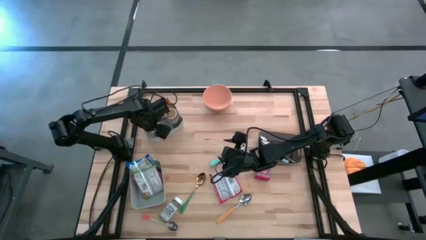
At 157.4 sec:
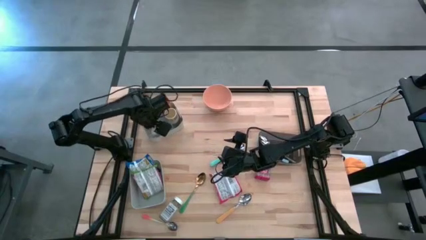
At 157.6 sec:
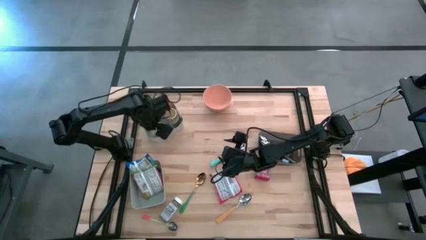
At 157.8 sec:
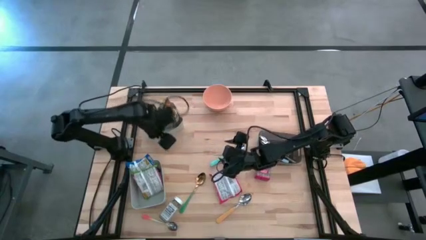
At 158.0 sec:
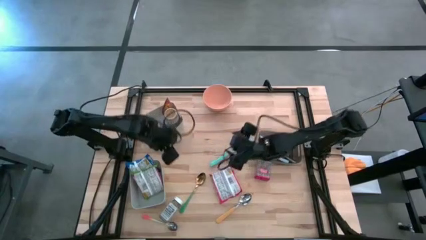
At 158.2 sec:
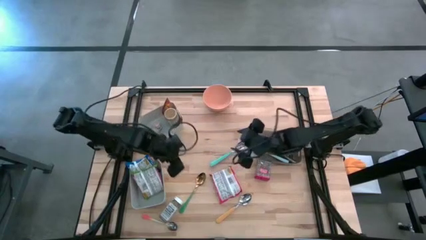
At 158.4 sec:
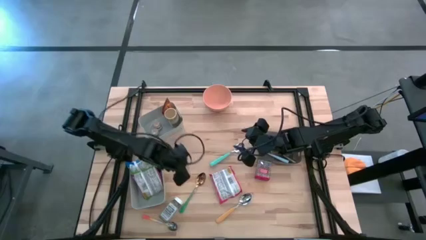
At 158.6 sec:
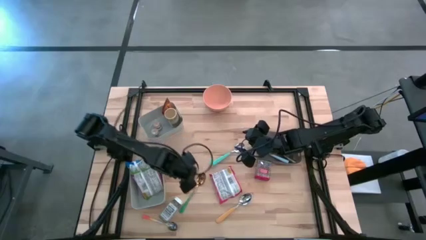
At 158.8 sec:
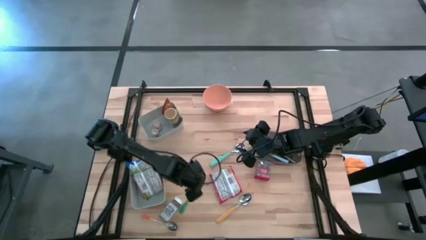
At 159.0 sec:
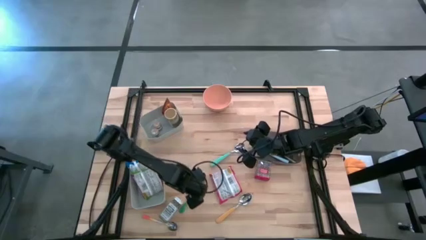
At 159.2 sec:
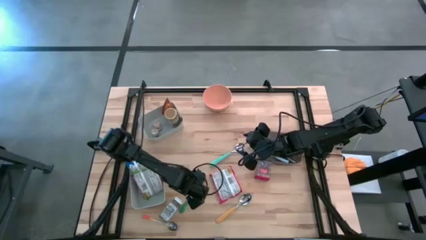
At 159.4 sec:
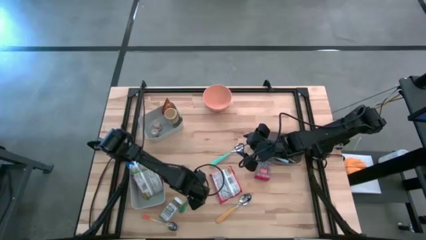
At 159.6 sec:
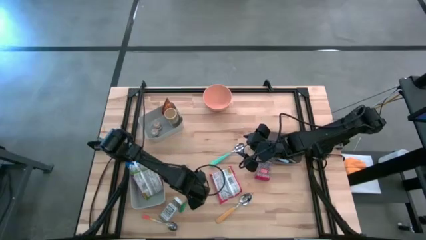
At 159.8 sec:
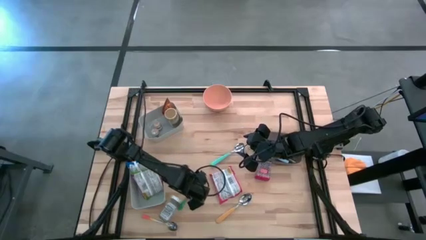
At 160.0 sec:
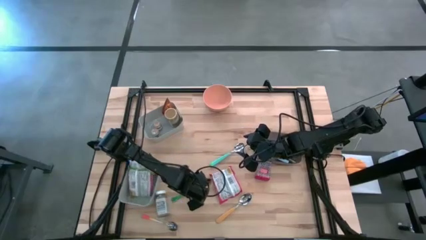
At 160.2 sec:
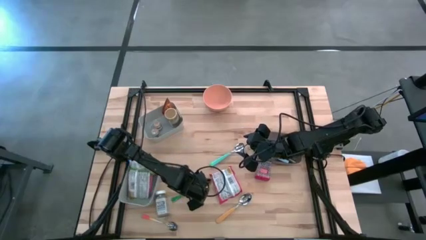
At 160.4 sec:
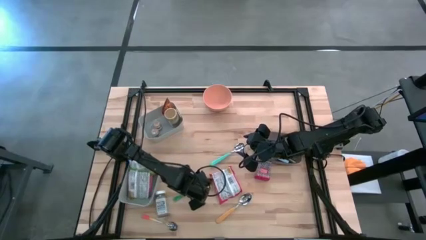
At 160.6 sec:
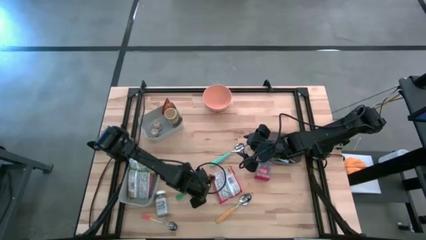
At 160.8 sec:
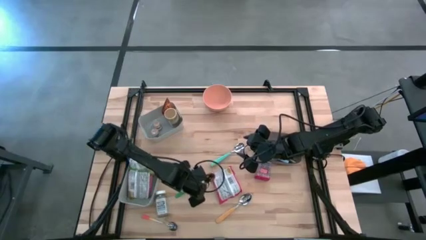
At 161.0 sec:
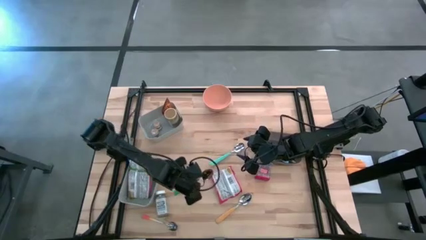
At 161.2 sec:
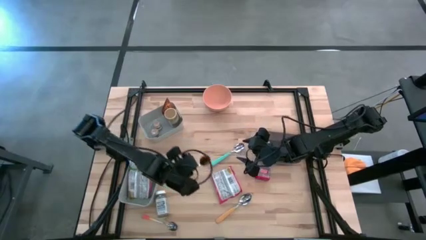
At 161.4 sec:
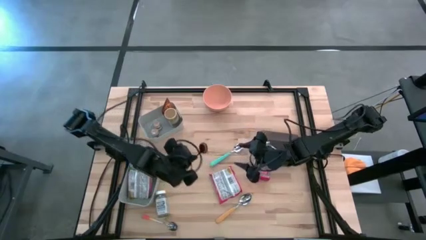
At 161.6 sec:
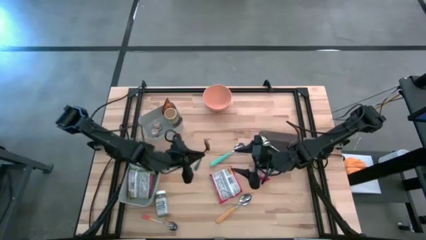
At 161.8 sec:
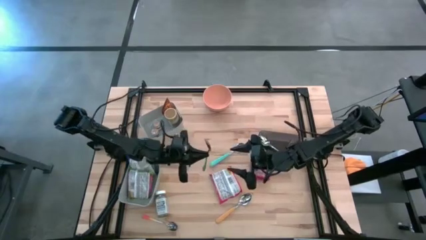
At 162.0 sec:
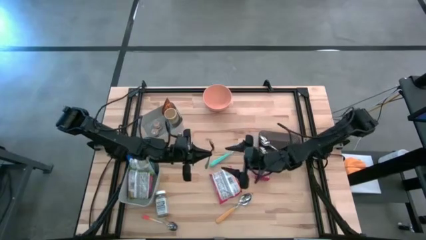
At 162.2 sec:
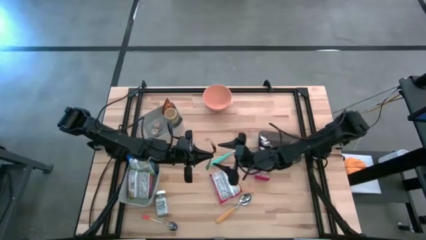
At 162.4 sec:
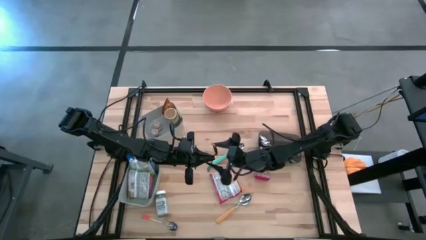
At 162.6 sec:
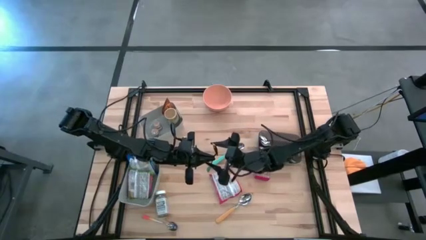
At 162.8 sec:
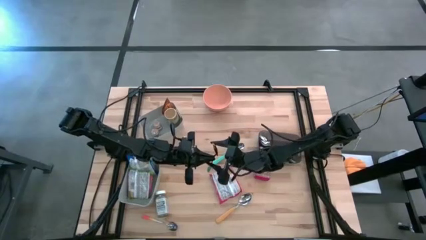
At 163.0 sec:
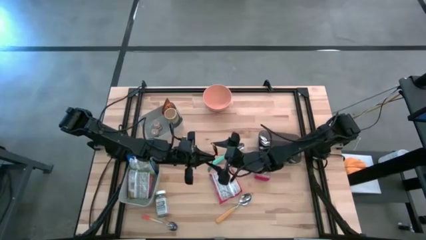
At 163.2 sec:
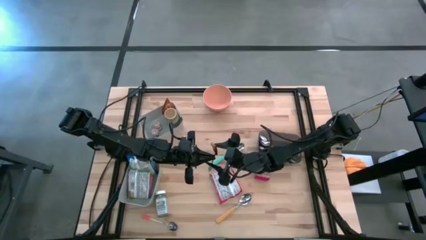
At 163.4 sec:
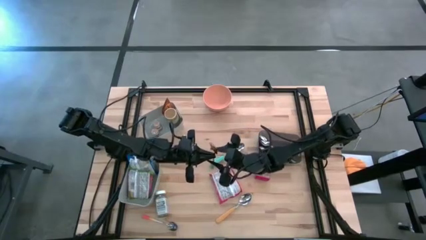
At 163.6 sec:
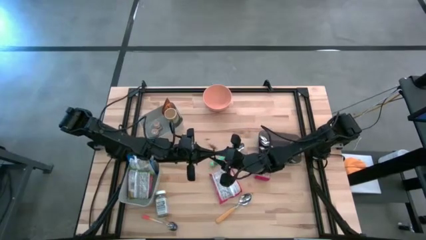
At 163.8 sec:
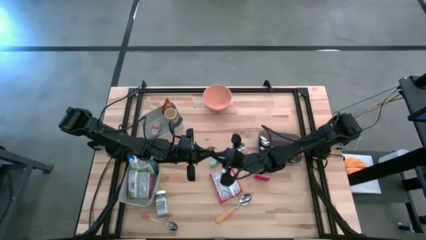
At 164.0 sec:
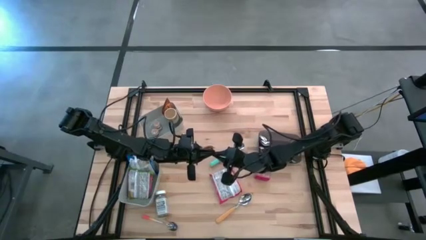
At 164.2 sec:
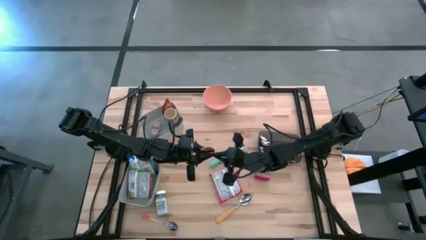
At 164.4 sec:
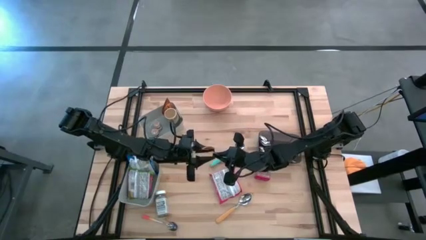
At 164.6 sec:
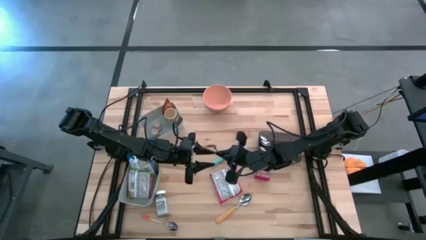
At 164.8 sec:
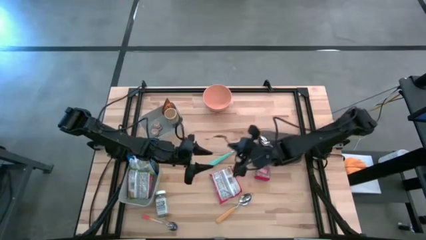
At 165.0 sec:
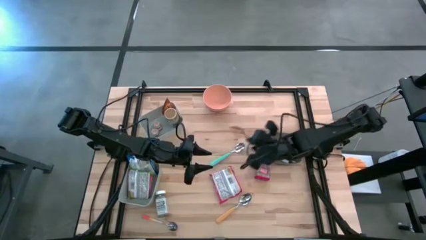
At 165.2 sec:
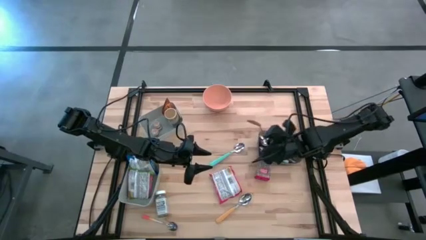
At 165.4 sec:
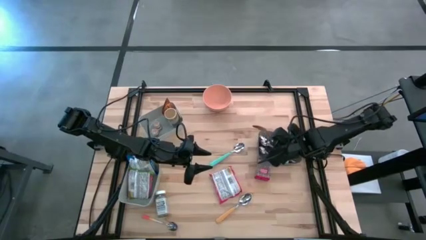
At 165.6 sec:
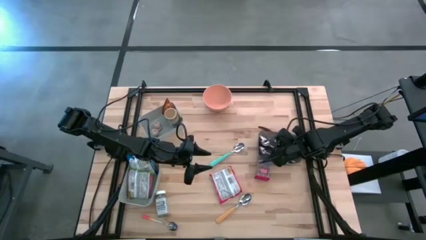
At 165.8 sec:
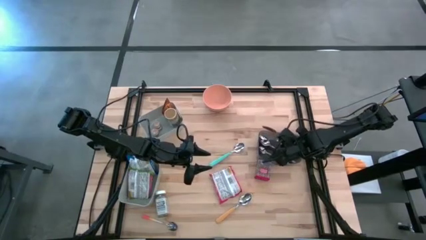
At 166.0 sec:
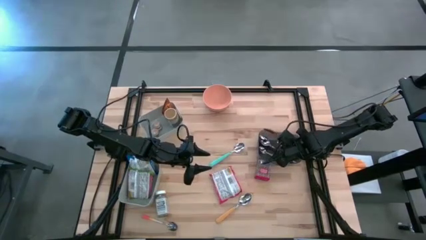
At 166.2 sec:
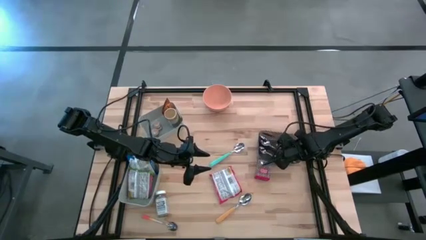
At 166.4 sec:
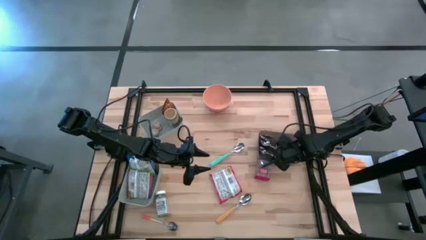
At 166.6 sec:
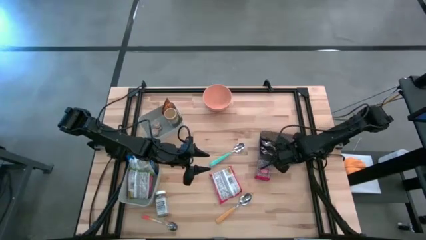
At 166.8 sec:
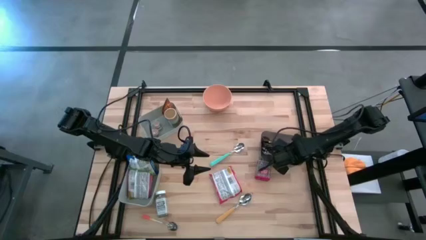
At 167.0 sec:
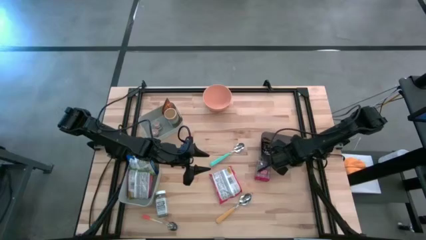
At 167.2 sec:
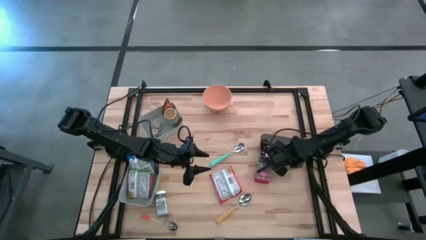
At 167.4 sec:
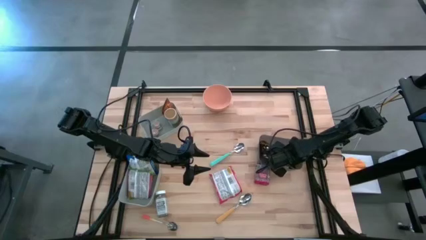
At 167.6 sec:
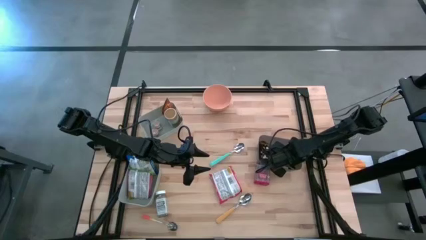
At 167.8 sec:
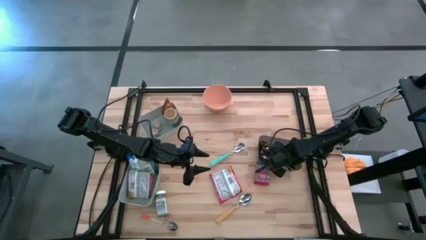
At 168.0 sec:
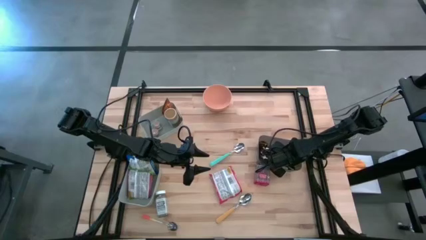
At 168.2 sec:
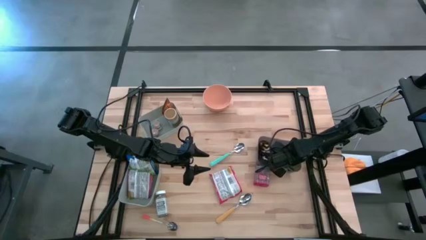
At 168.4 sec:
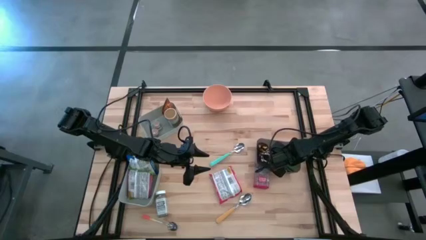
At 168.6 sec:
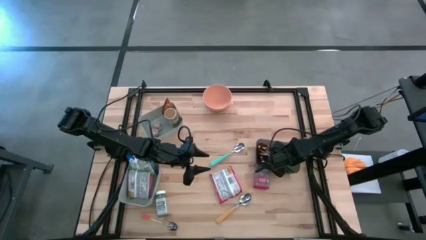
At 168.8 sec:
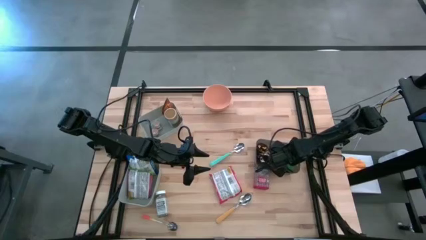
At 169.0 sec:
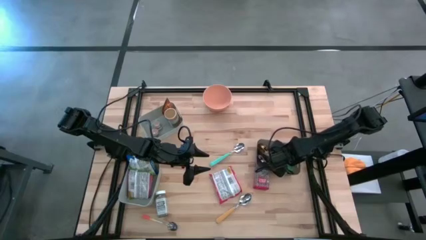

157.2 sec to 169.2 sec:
Put the green spoon into the black bin

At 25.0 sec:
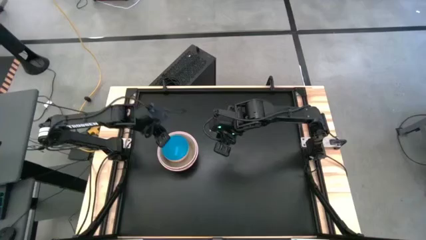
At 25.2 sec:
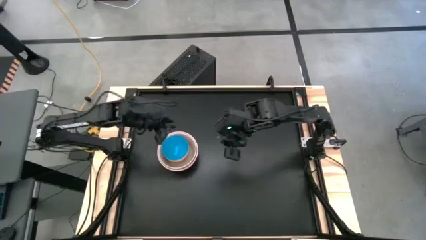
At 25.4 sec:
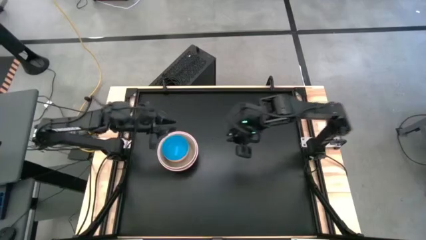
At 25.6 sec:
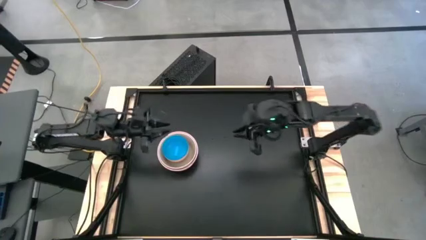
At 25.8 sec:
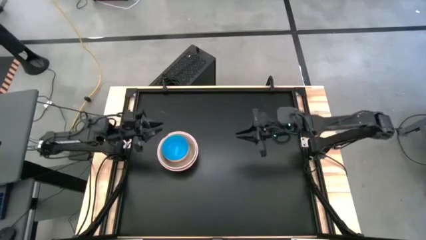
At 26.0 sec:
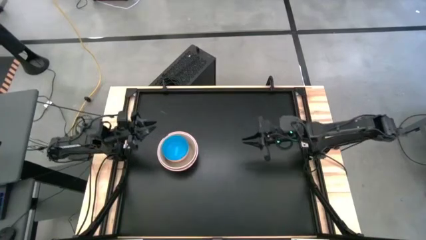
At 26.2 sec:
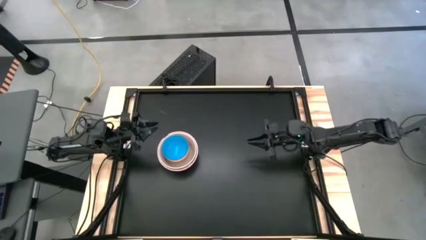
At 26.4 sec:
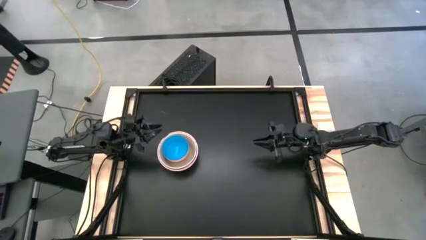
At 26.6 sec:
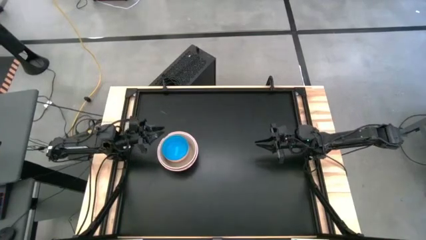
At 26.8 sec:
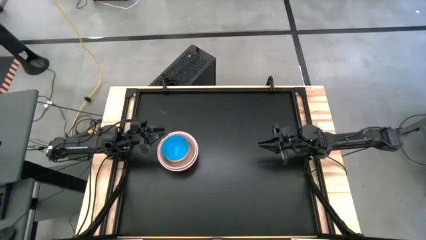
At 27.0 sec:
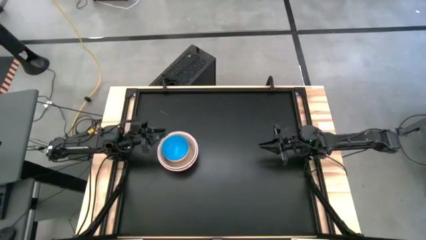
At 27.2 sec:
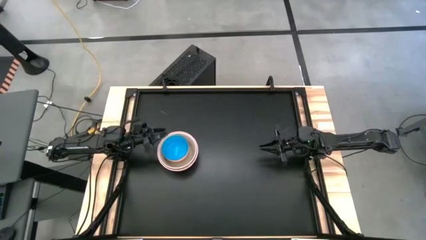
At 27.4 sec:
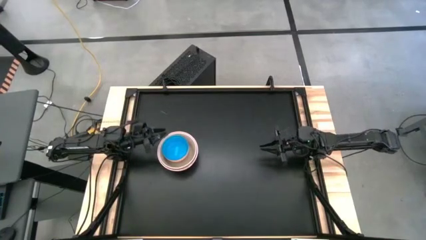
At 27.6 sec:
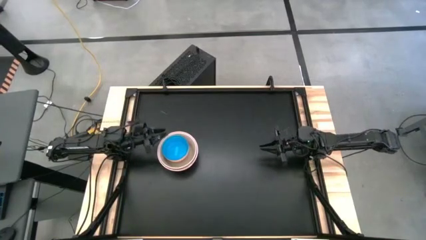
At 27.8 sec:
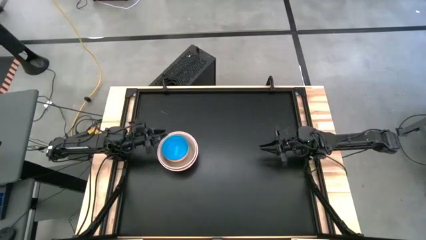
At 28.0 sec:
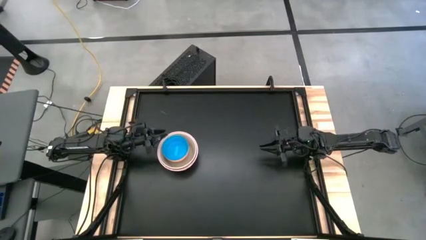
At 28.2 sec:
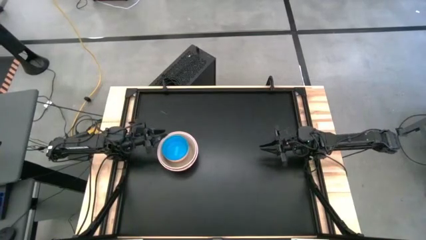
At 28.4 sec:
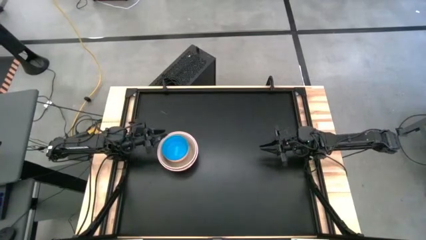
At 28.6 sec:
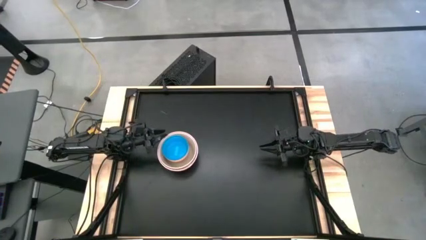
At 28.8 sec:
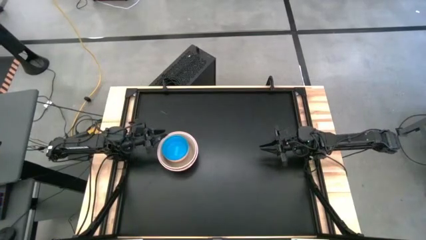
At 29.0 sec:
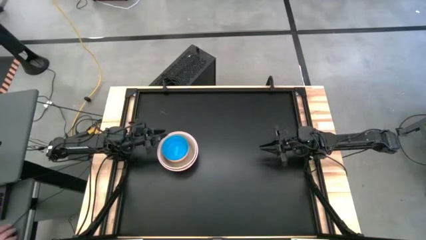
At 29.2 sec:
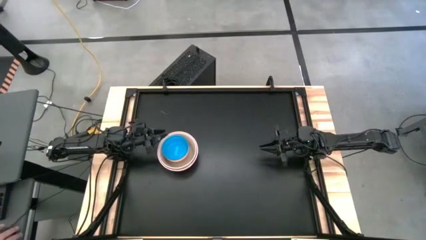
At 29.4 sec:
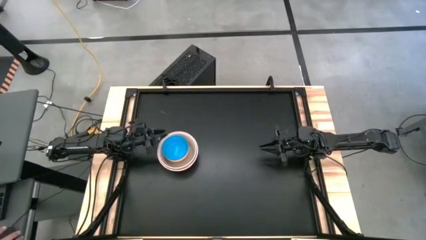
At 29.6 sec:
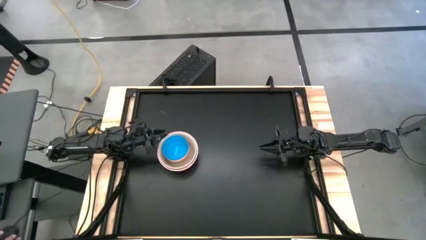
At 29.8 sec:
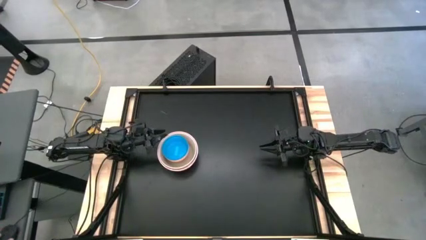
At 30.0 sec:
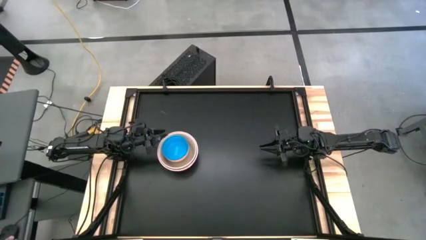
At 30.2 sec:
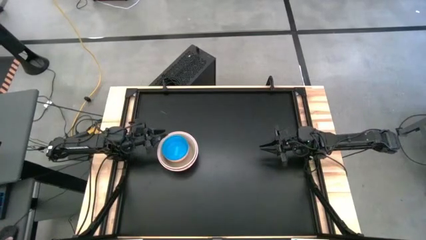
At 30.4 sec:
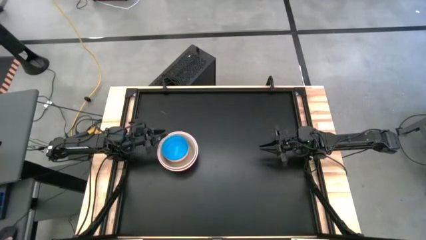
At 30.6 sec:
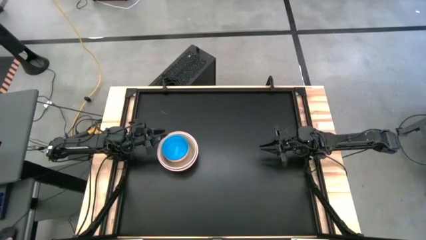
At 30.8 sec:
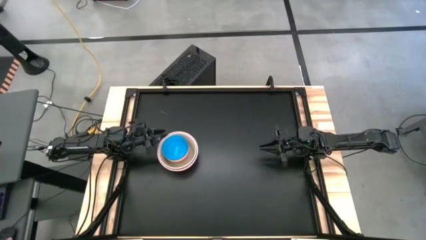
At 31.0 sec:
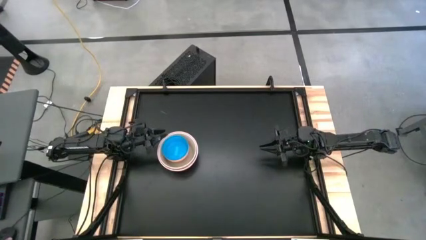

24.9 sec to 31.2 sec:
Return to Home Position
